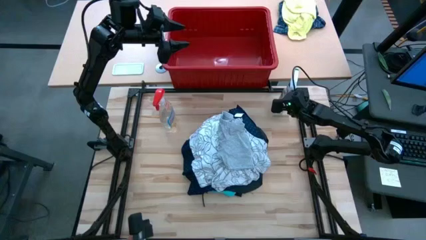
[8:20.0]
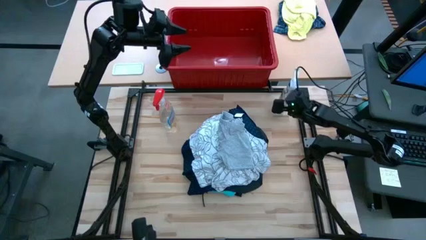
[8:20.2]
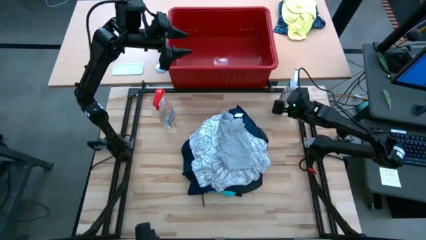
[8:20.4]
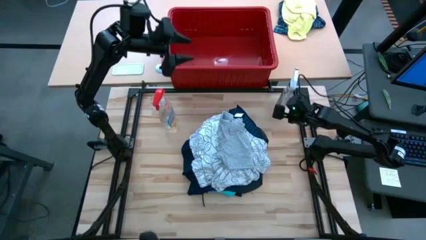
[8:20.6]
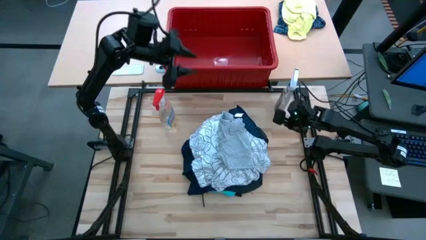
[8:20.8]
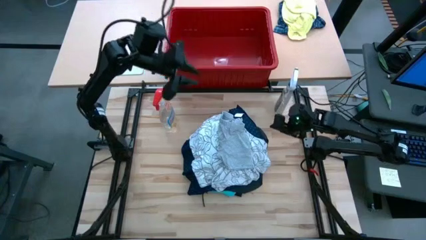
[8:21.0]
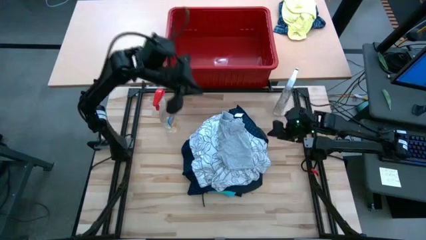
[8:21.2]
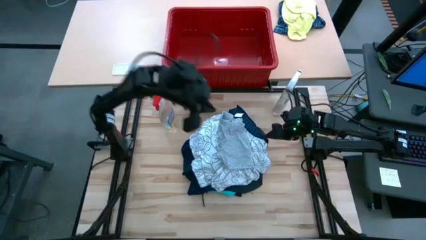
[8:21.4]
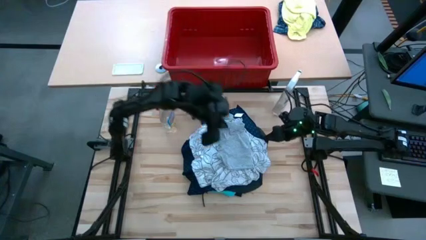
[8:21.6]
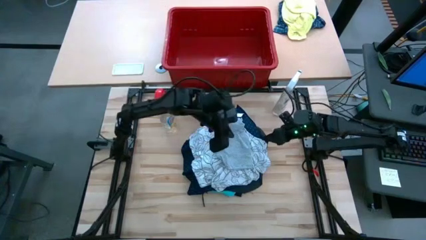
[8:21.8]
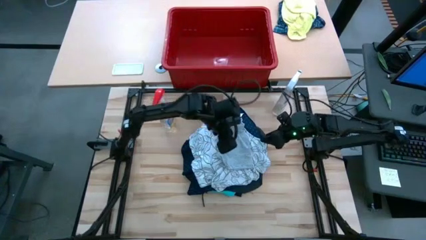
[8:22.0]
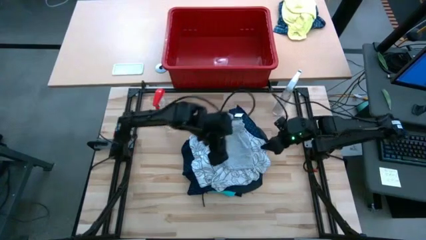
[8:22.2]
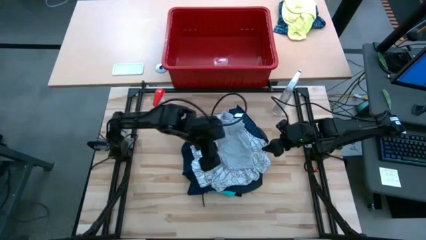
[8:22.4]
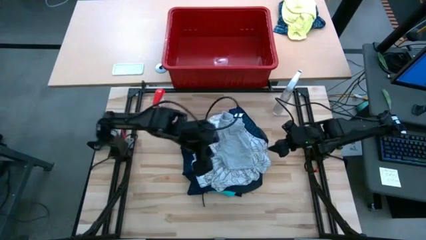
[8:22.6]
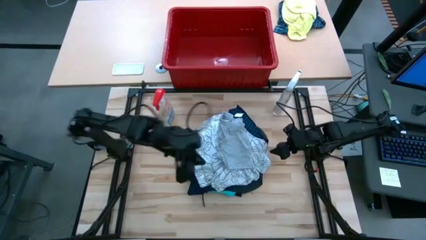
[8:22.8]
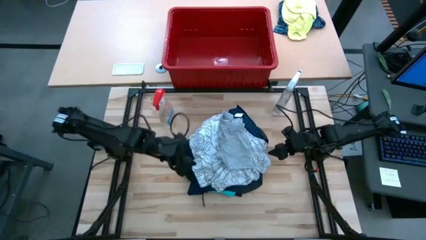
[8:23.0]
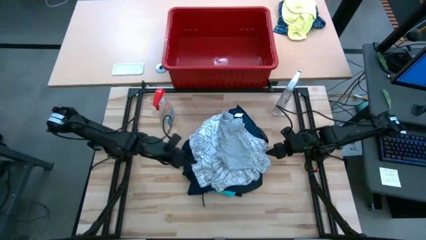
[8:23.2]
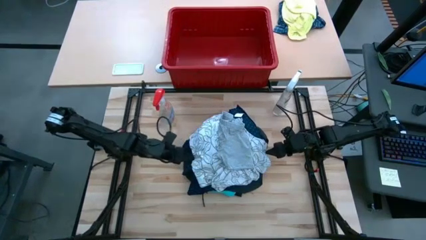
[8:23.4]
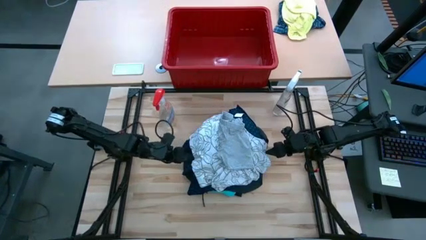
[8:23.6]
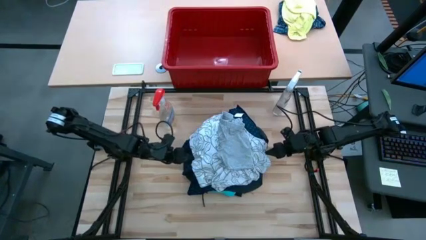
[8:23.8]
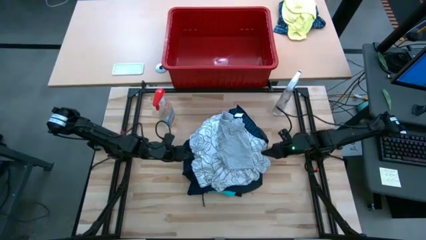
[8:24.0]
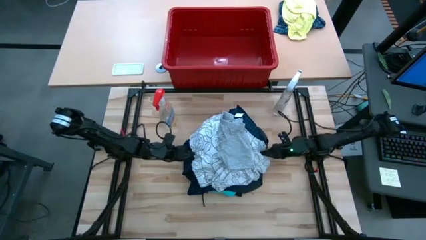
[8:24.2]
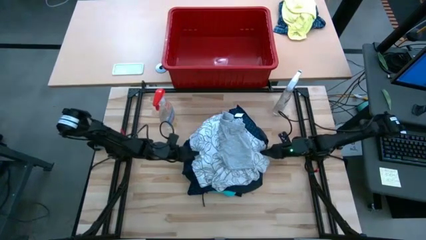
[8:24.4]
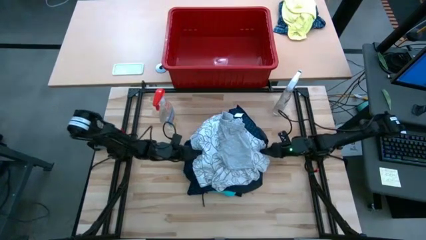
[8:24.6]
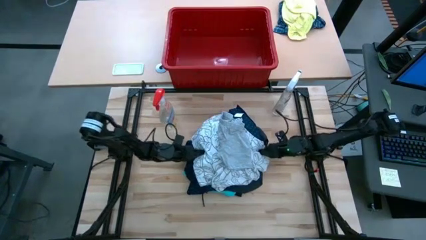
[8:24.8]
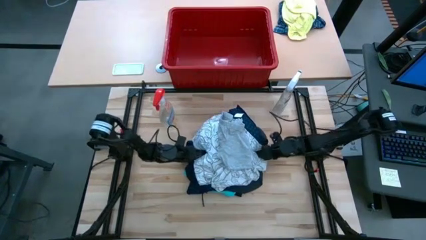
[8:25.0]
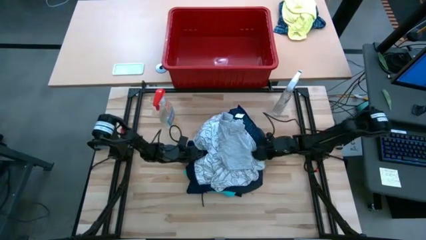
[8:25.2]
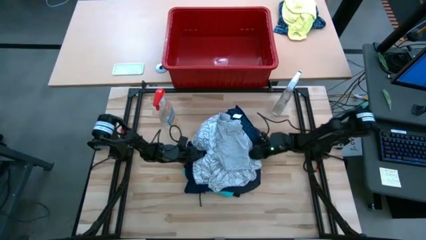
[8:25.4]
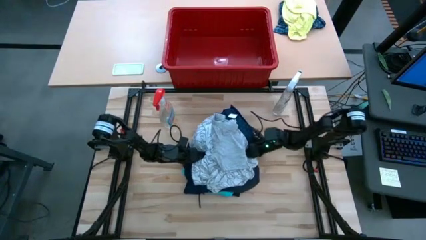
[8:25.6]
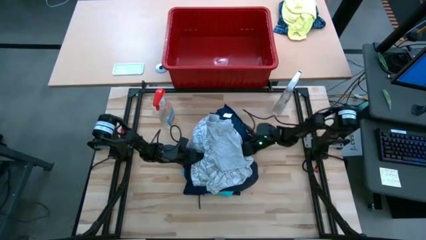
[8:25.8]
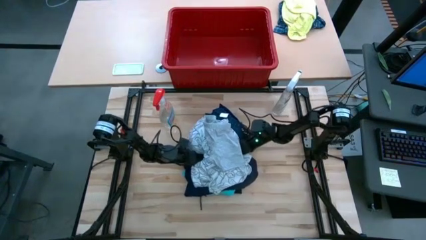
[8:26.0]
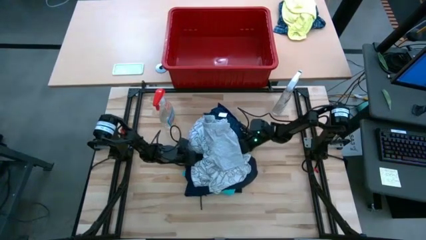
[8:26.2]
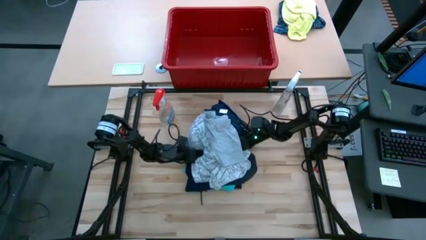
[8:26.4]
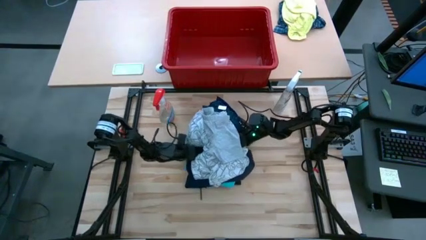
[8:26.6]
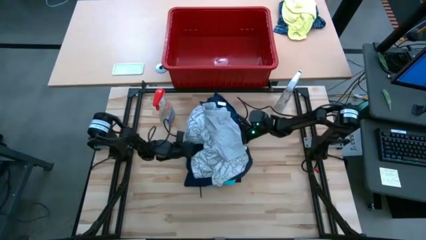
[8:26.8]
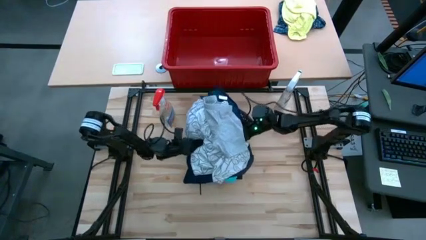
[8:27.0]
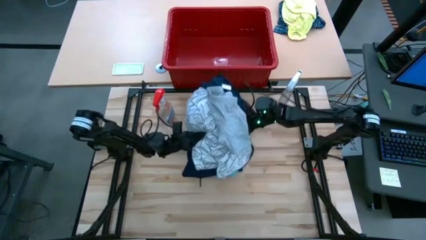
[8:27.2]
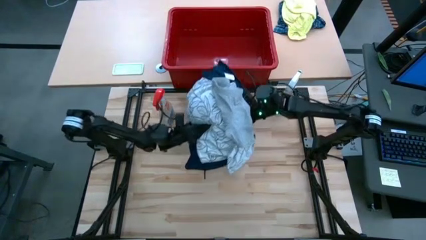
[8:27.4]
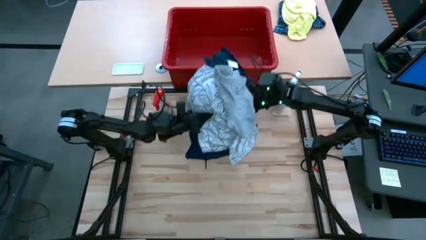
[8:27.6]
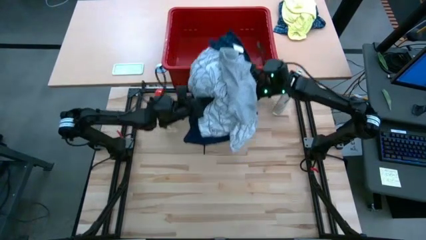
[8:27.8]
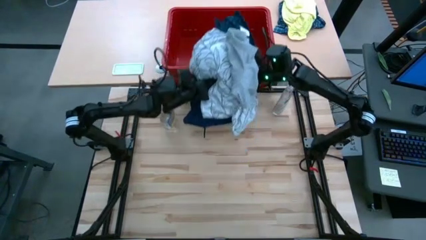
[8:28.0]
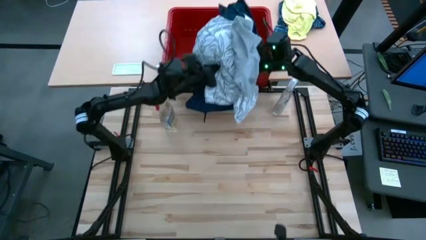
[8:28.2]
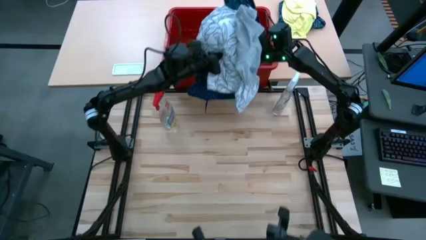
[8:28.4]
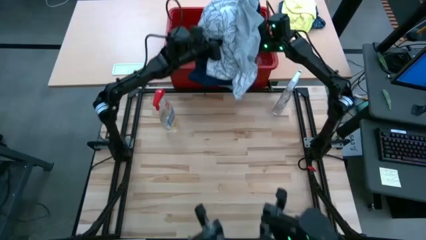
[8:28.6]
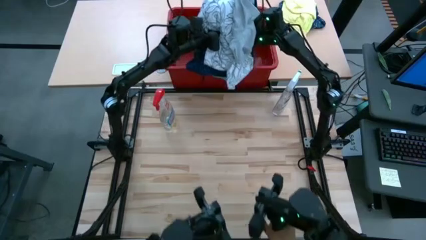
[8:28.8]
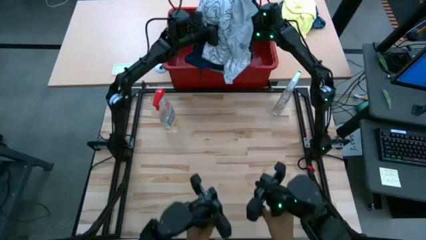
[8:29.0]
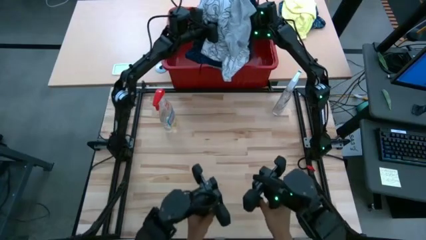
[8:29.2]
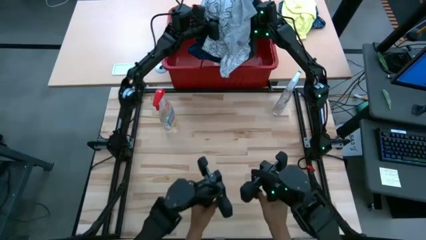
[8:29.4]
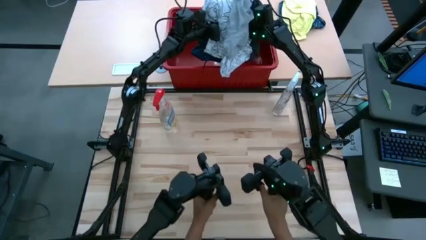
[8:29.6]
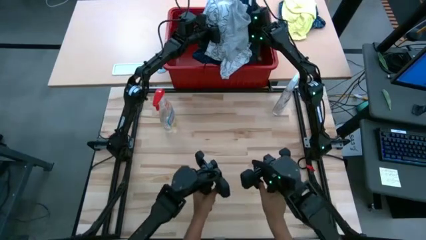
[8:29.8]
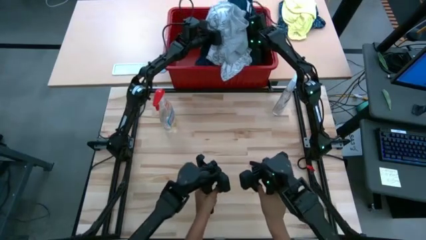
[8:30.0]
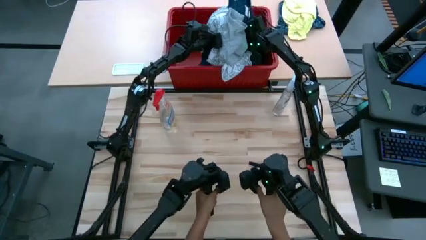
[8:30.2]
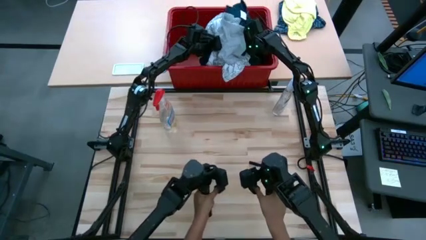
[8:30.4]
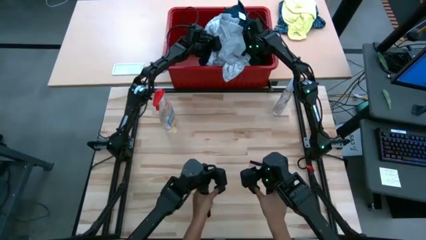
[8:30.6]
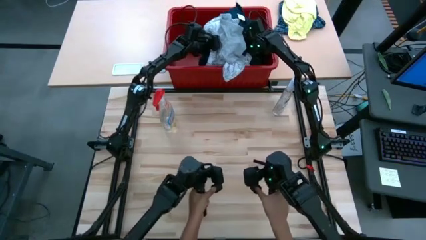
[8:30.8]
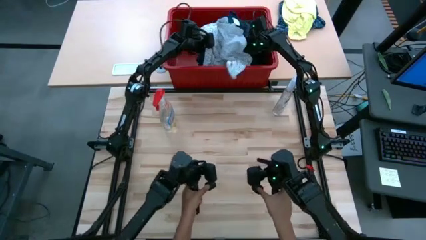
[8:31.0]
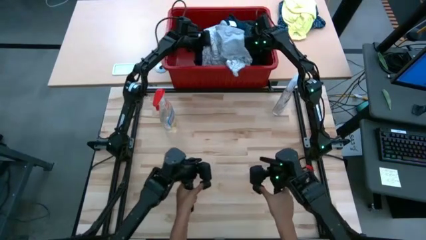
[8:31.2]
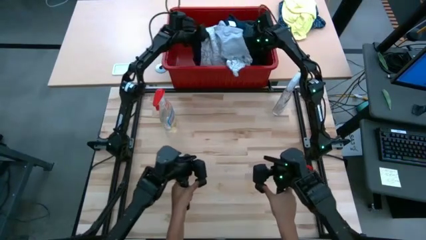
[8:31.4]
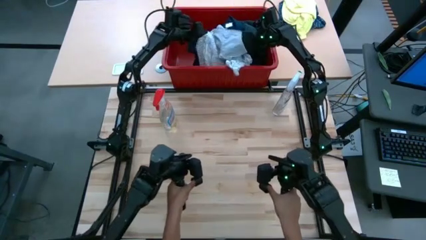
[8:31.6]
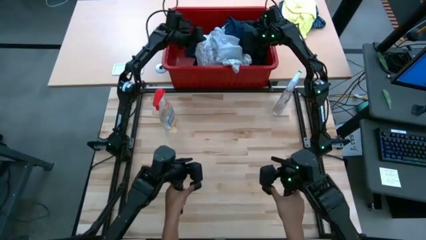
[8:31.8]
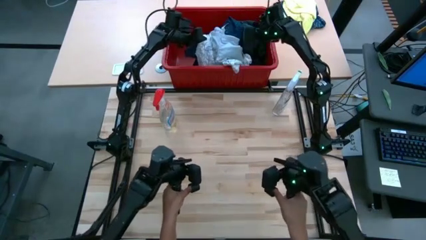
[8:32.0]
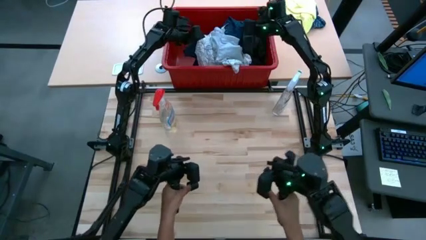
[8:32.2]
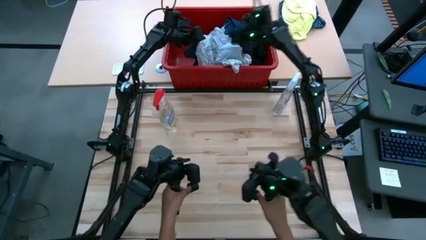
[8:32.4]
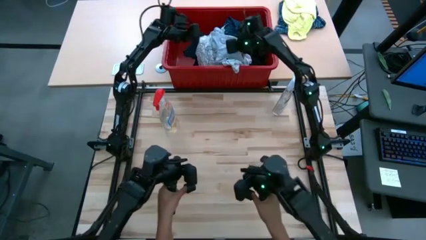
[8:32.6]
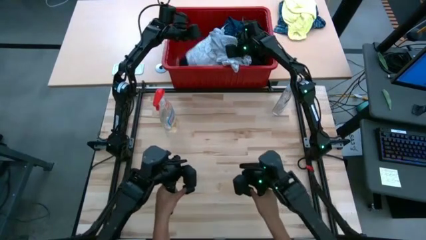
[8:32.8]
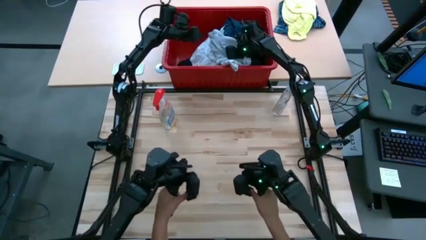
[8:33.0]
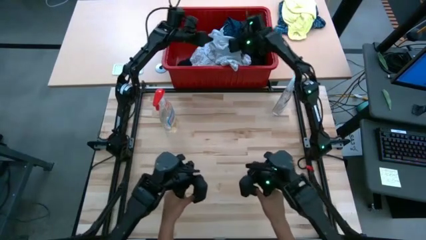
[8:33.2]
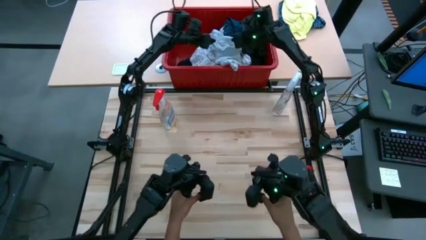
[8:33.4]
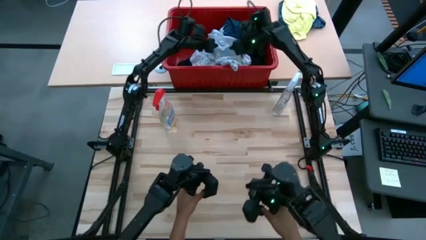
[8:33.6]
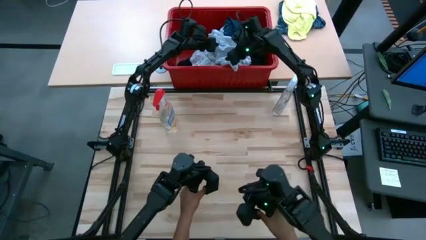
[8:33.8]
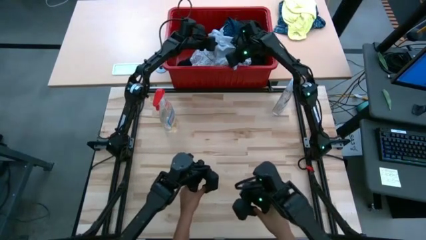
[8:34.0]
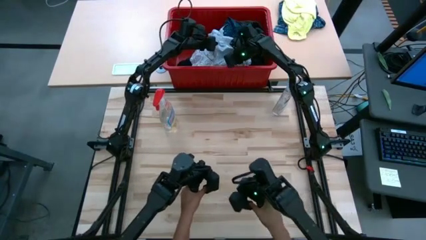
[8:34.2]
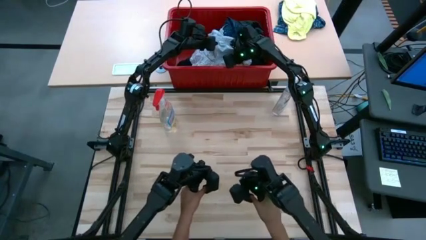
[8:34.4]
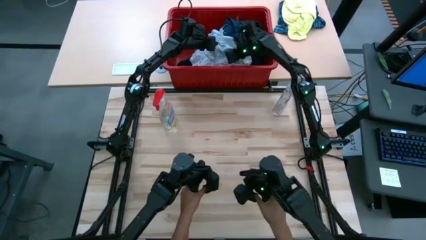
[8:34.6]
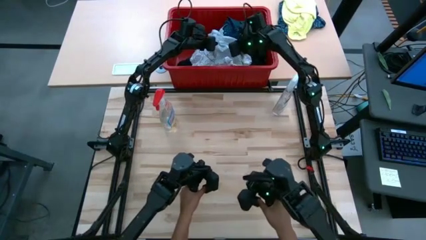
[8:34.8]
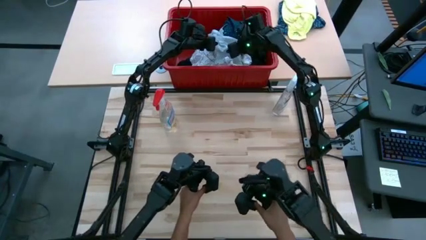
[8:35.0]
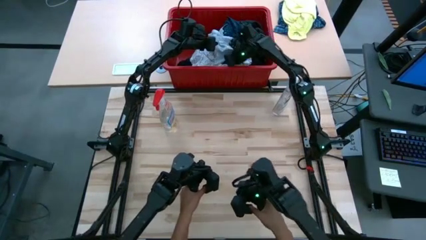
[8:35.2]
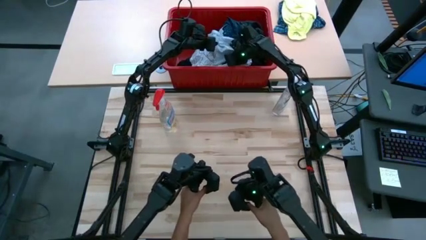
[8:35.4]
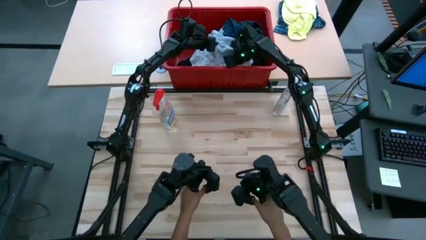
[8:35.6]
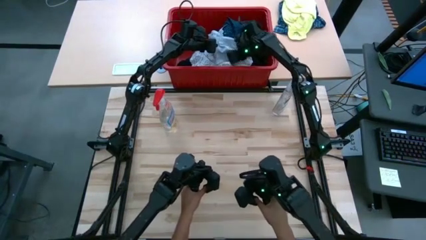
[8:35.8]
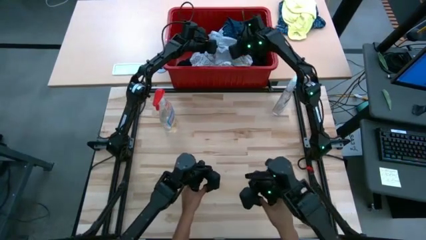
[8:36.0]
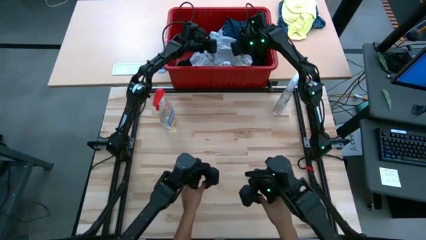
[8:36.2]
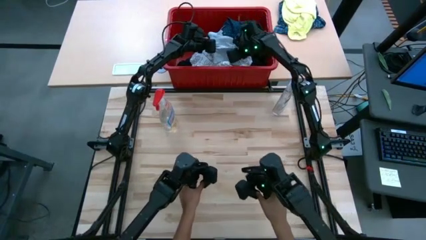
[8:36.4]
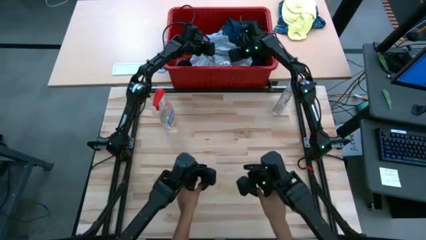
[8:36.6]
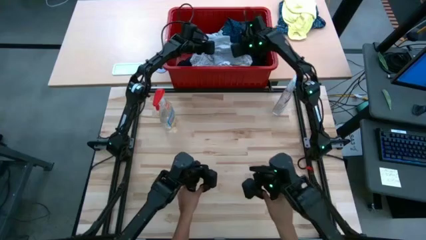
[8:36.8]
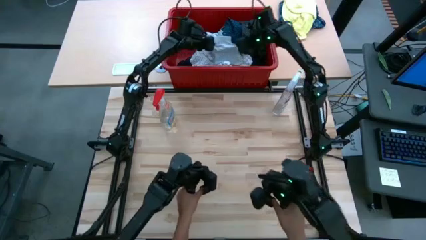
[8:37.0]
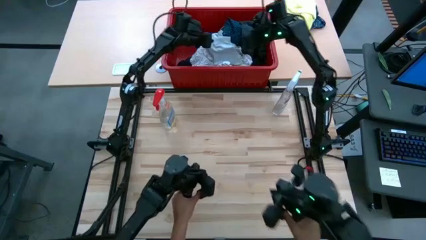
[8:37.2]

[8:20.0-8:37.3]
Task: Fold Laundry from Bin
Put the folded clothes into the red bin
